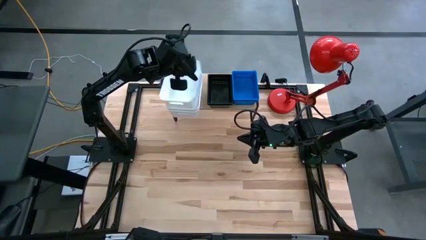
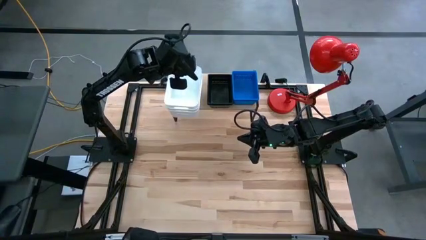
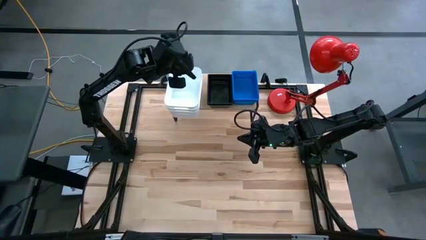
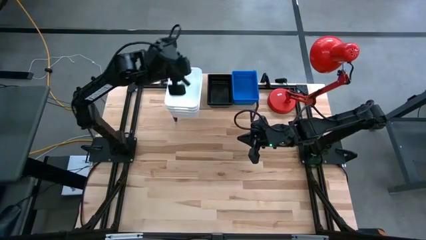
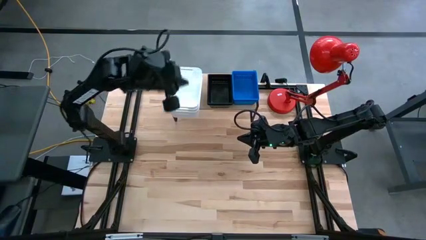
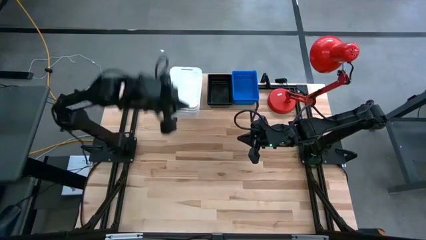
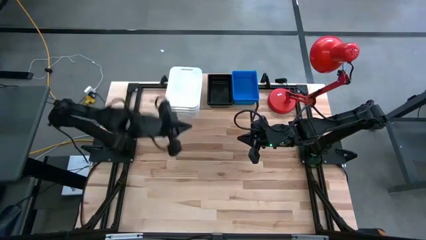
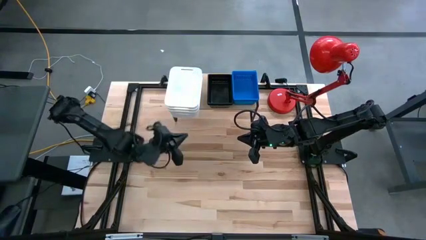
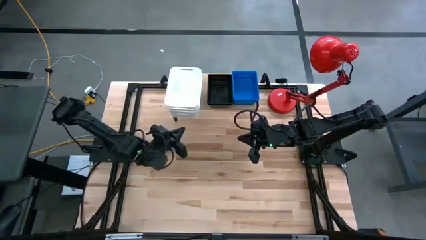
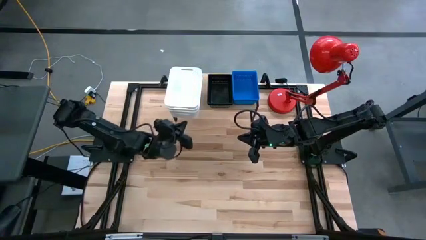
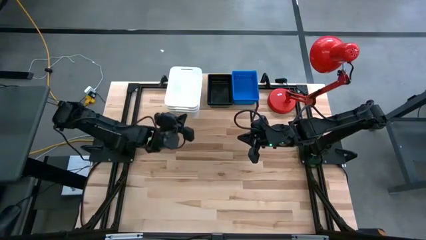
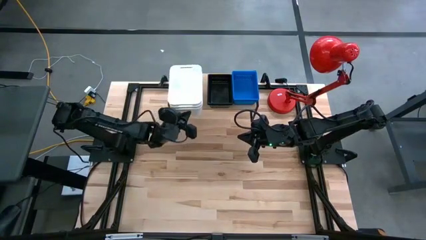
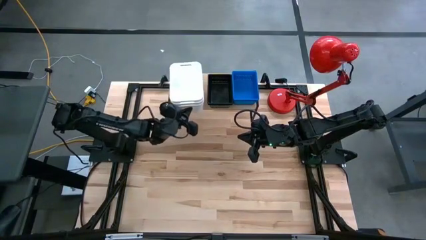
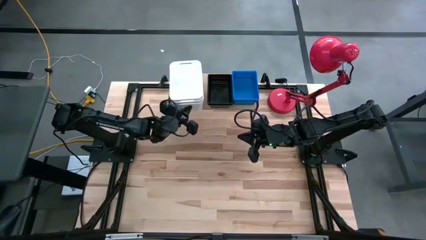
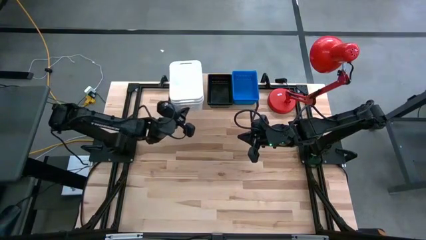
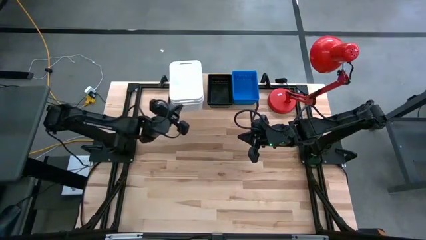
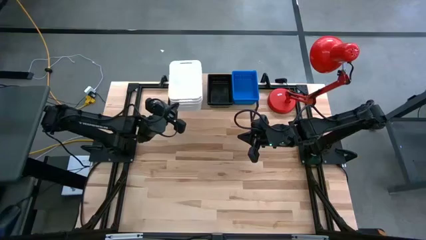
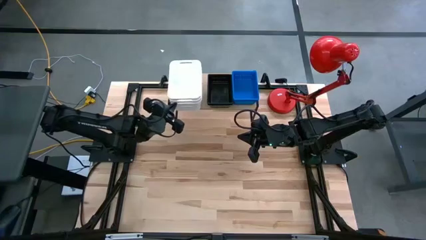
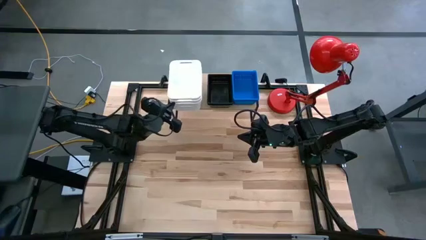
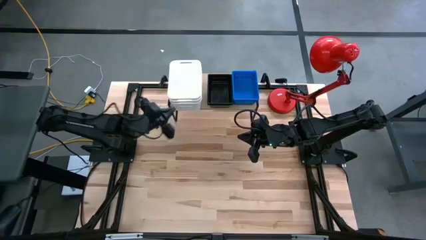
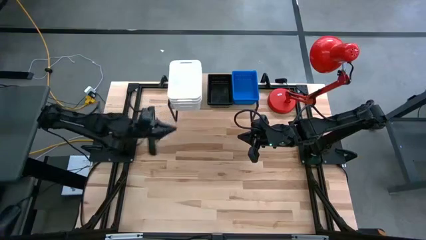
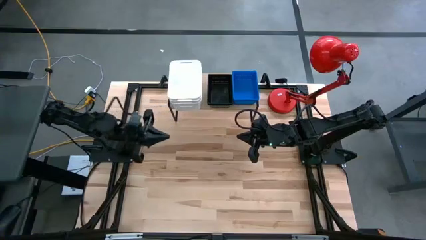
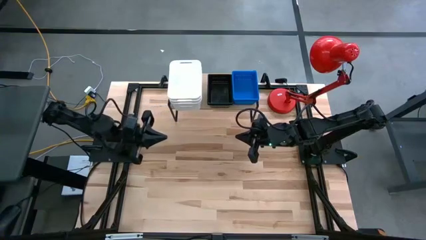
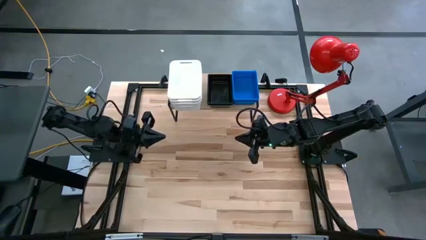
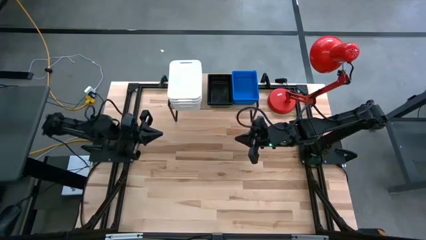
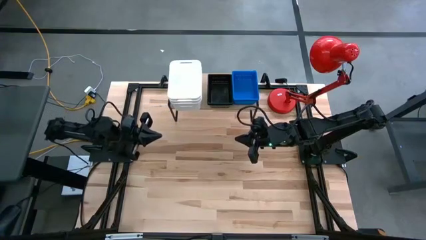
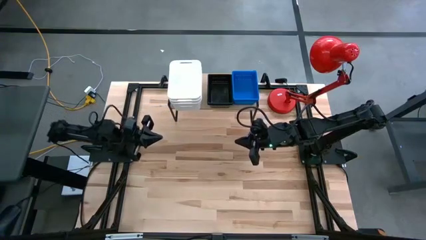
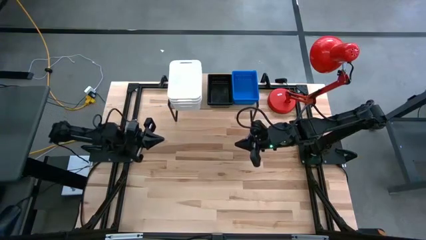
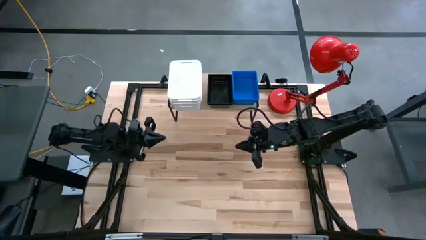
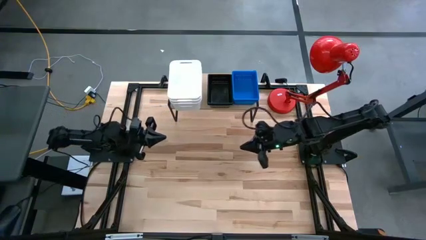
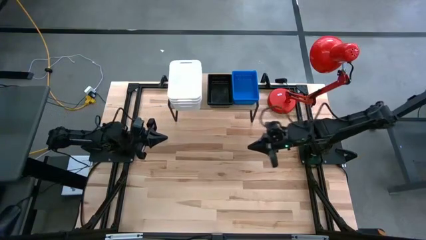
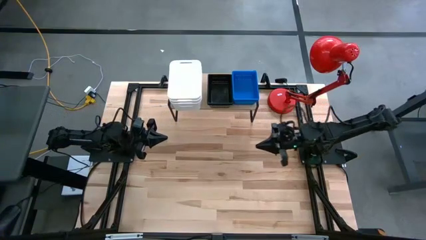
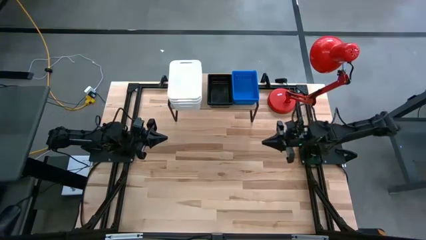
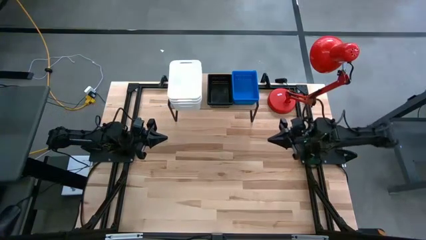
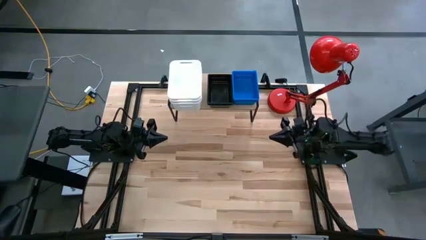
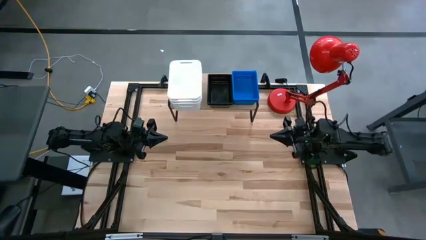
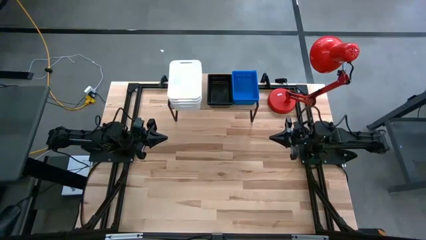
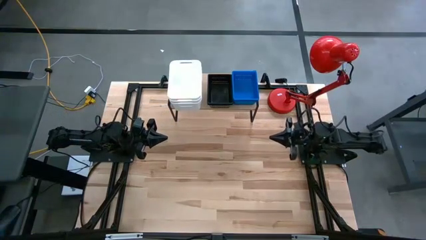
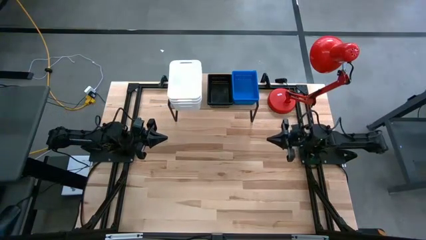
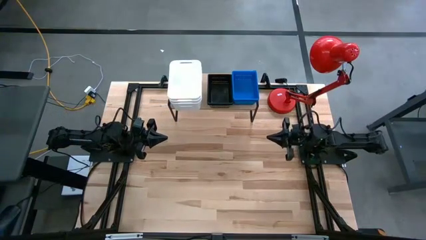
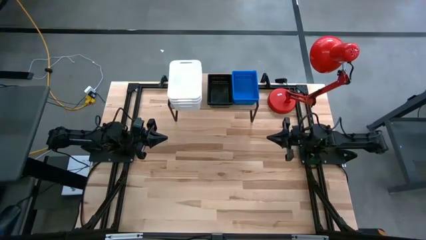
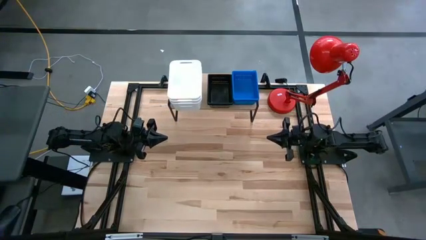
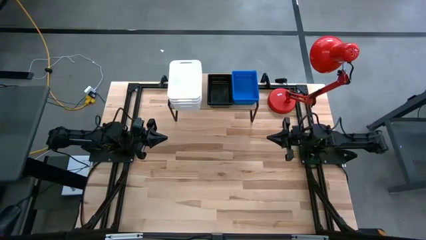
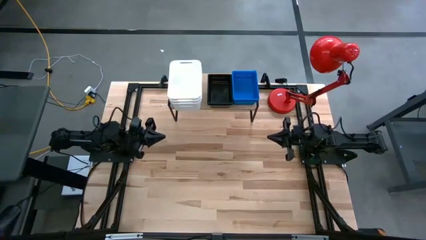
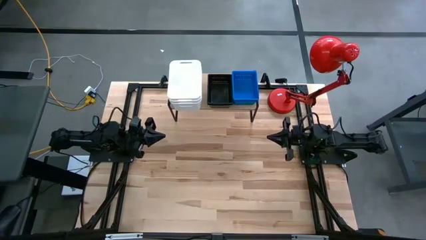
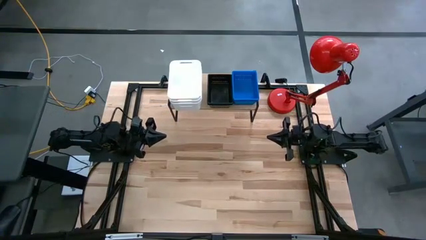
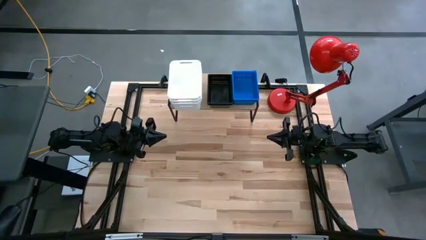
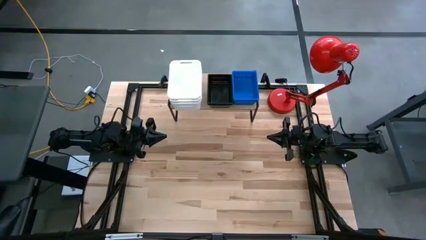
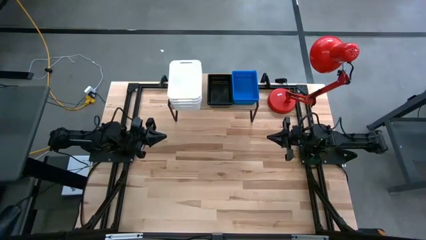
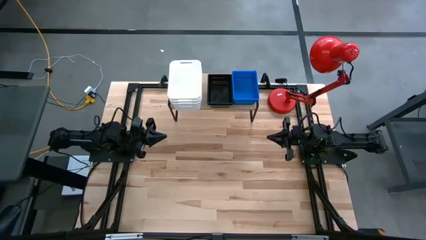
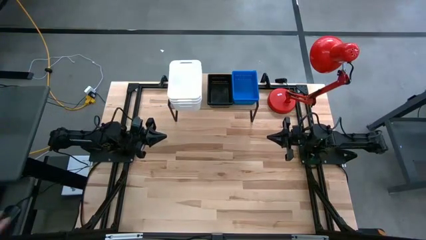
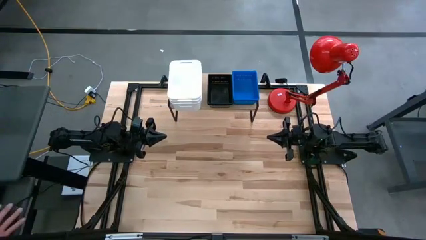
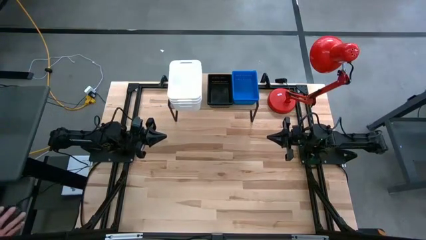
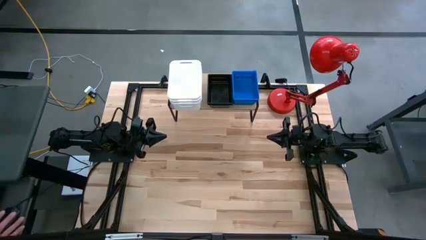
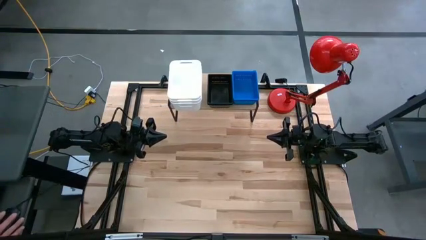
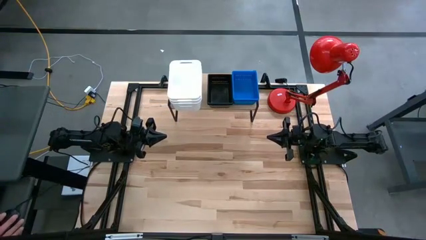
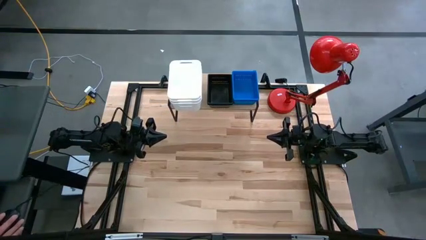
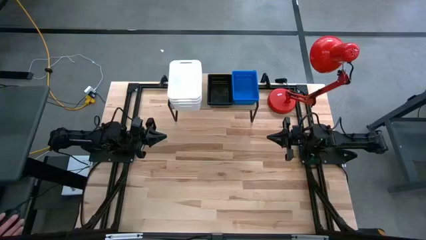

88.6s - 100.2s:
Task: Stack baskets on shelf by color
Return to Home Position

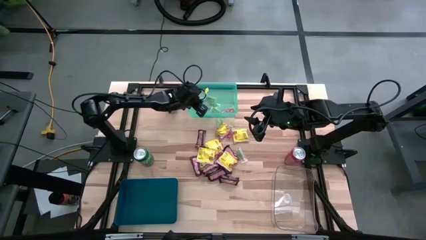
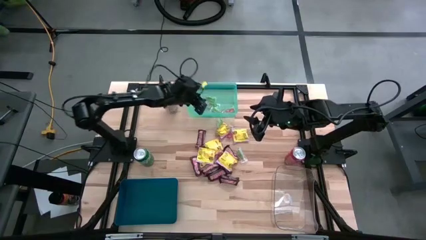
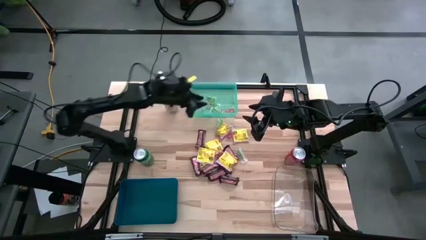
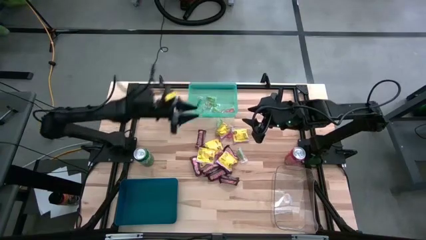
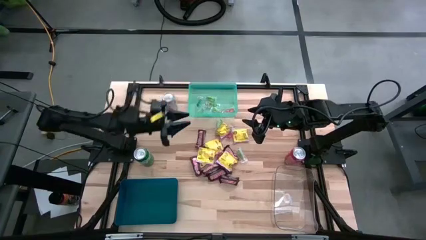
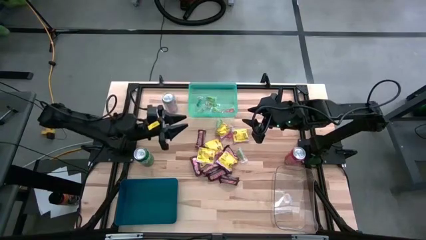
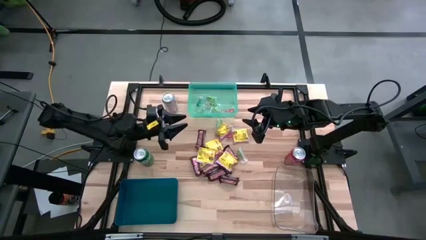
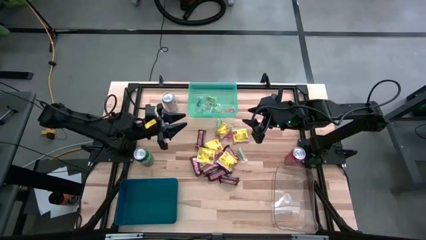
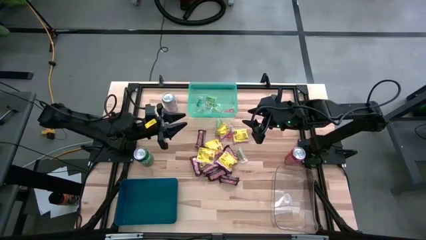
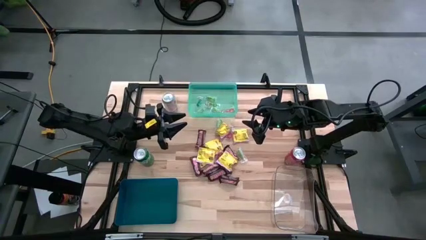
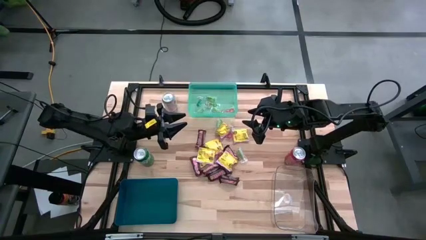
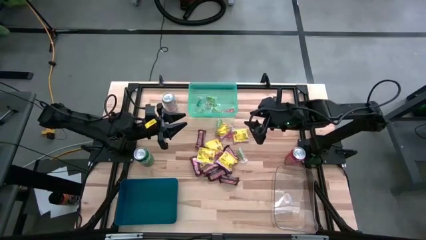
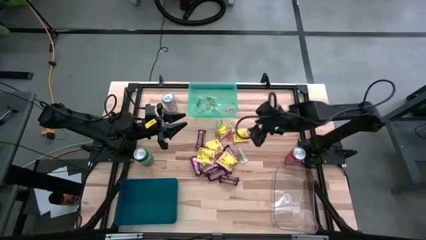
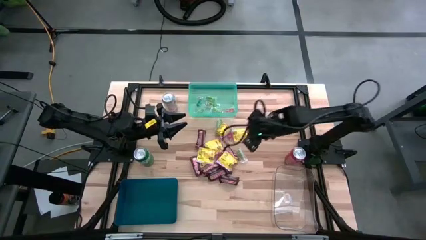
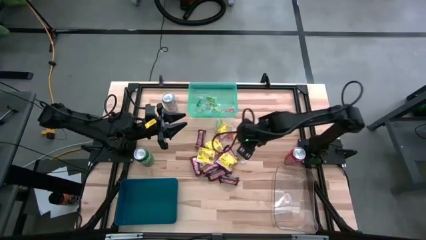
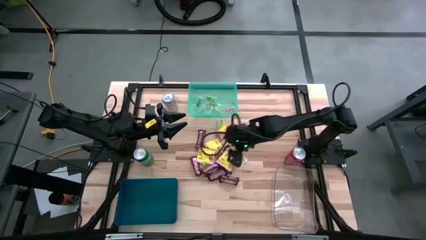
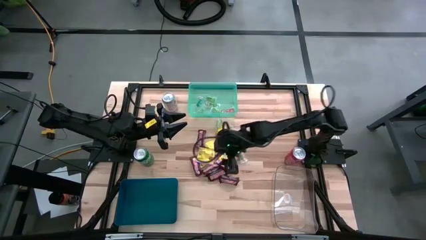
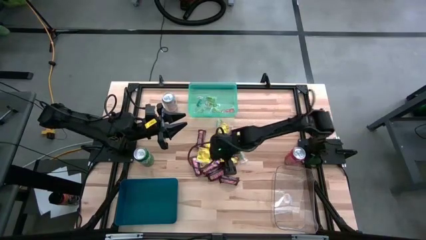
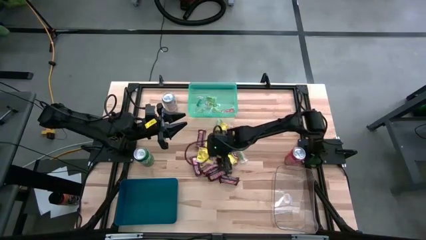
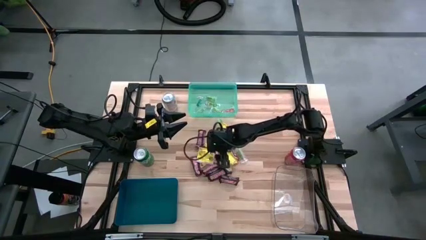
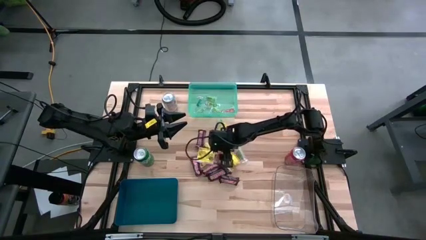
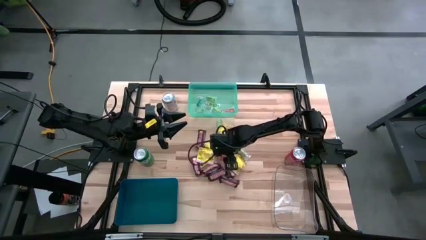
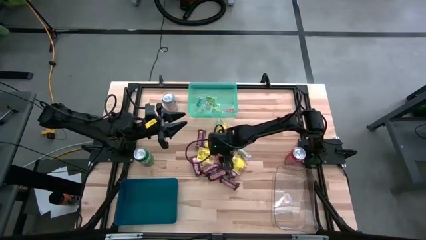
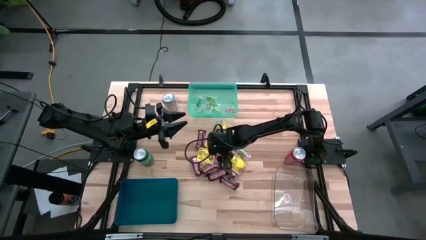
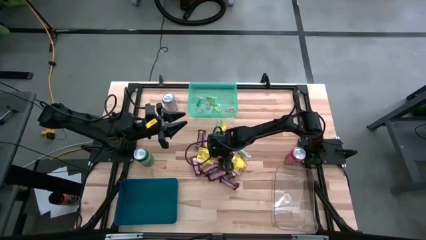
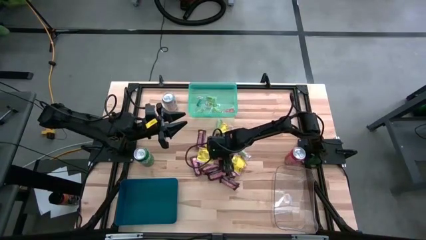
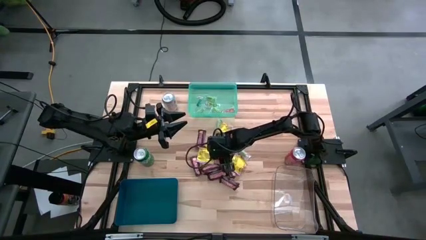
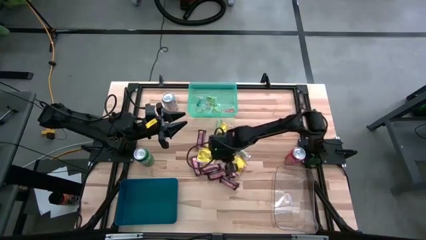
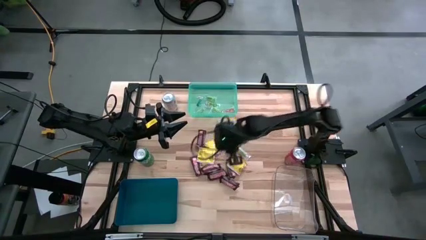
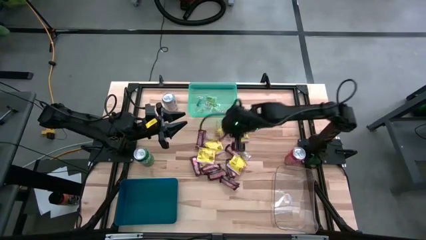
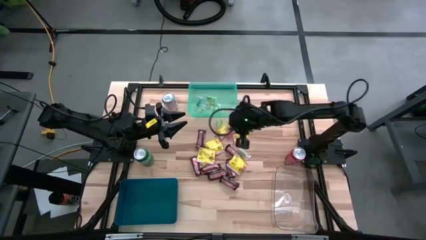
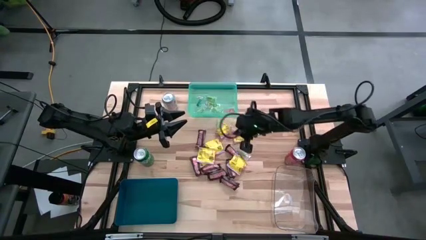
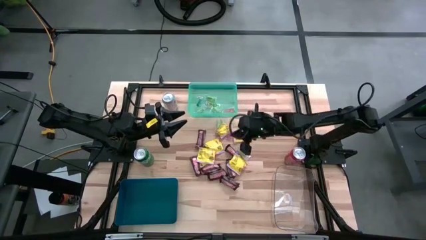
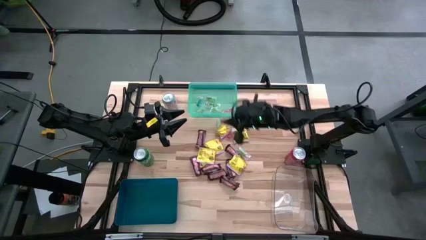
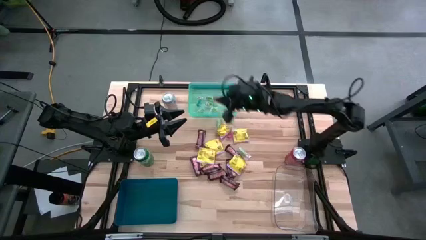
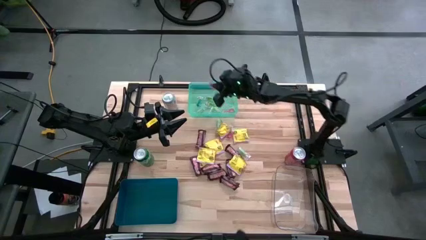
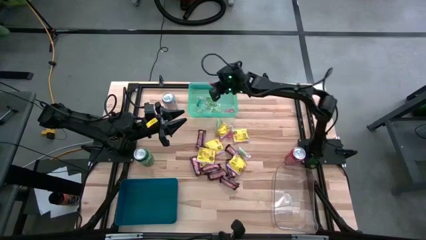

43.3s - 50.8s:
Task: Sort candy
Put the red gummy into the light blue bin
